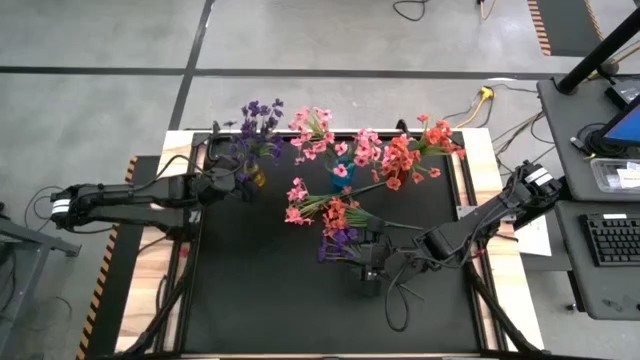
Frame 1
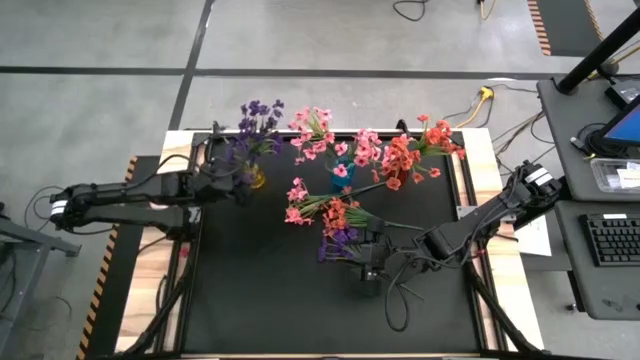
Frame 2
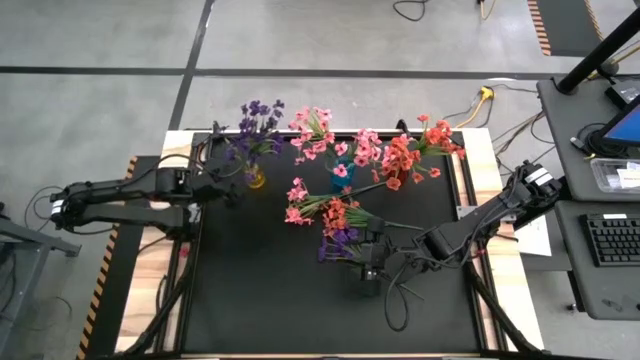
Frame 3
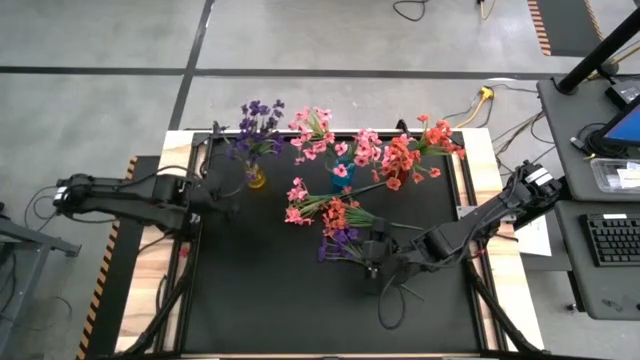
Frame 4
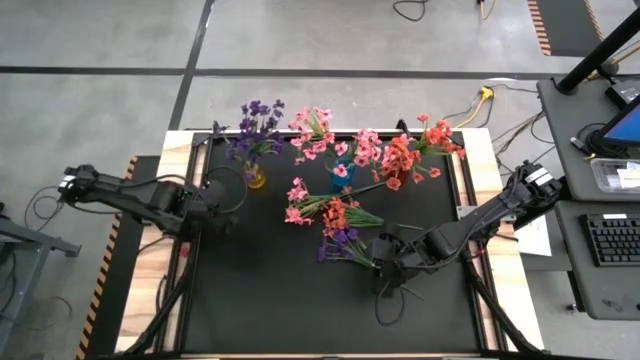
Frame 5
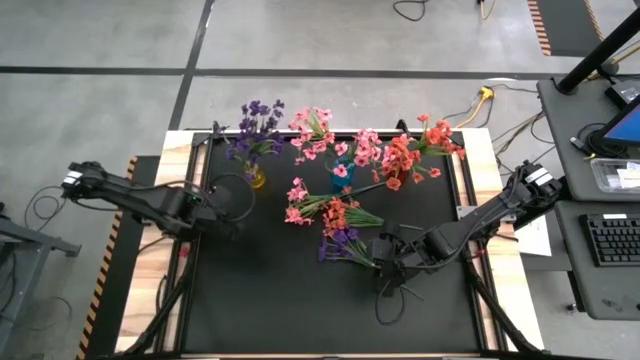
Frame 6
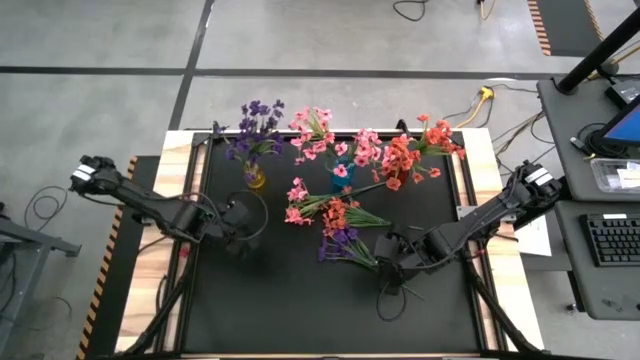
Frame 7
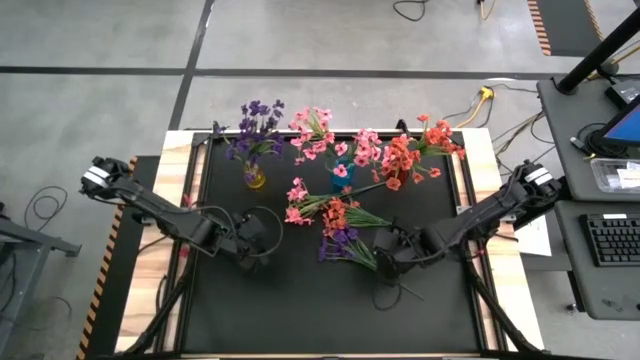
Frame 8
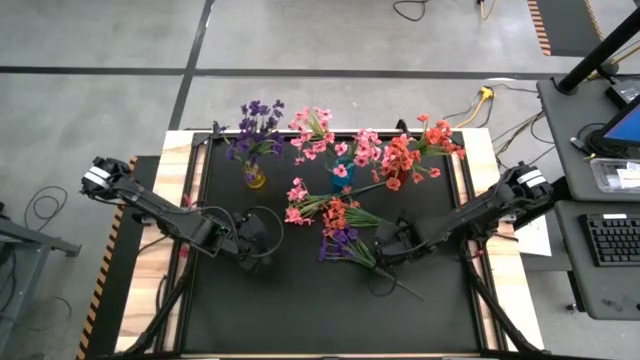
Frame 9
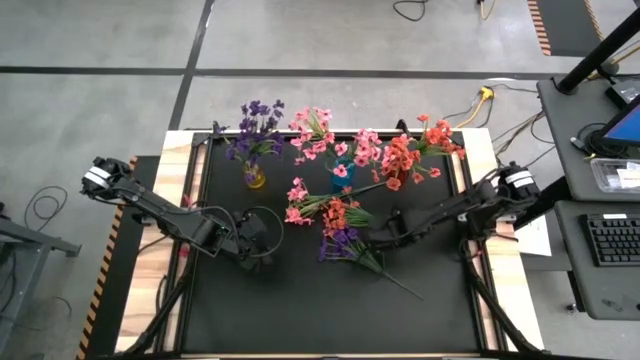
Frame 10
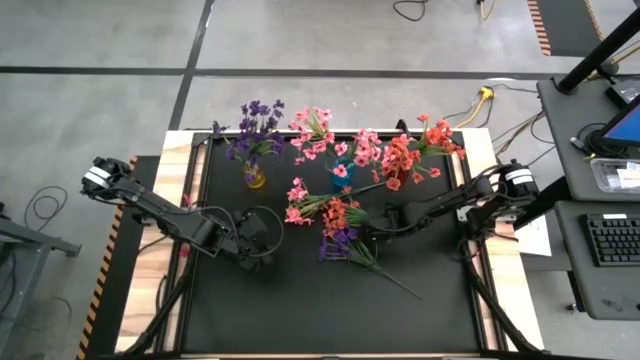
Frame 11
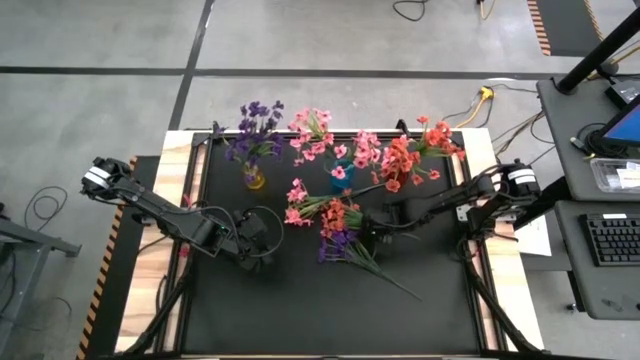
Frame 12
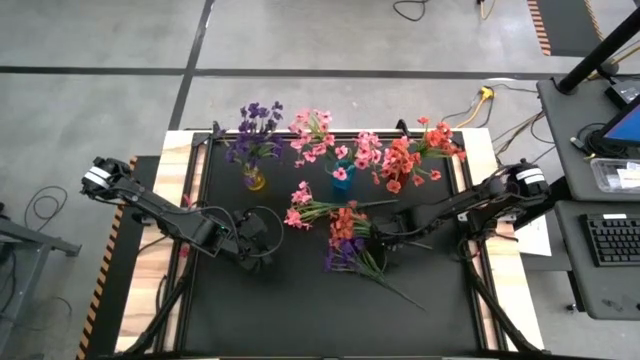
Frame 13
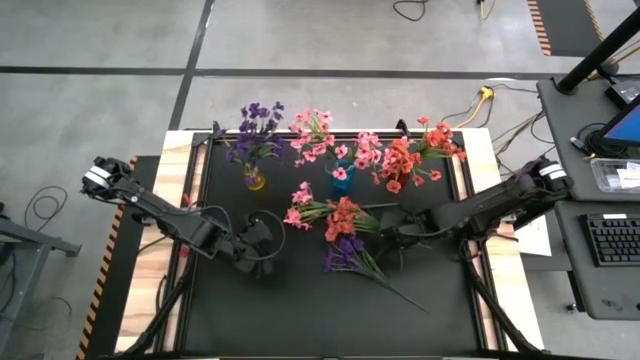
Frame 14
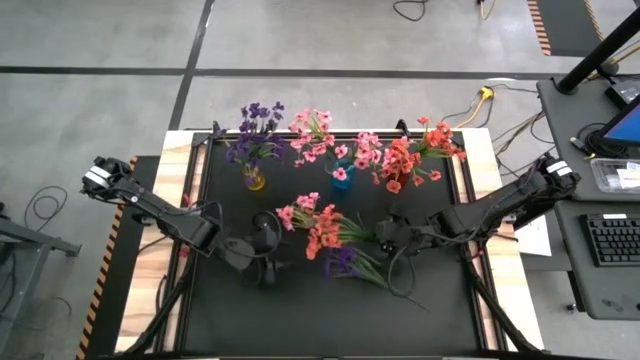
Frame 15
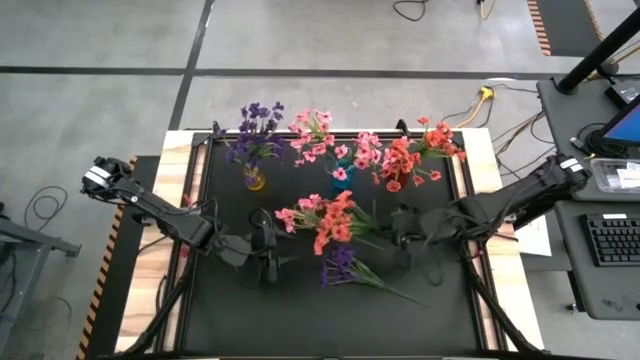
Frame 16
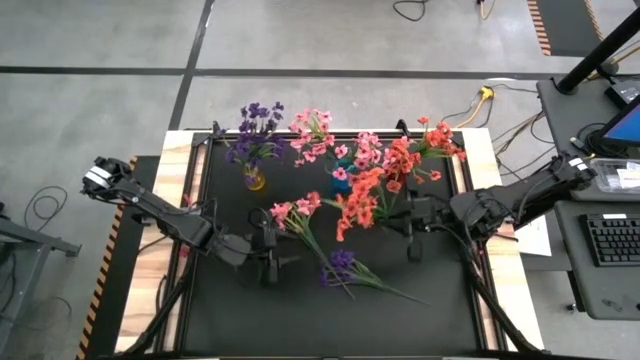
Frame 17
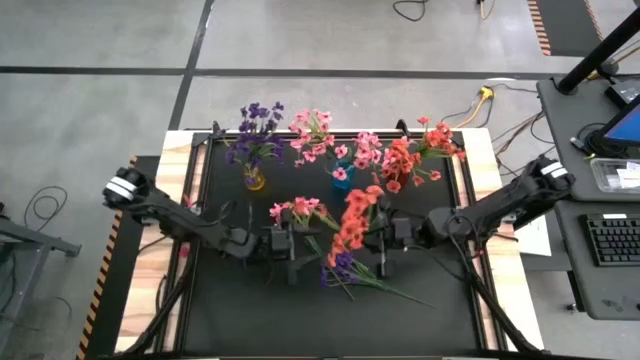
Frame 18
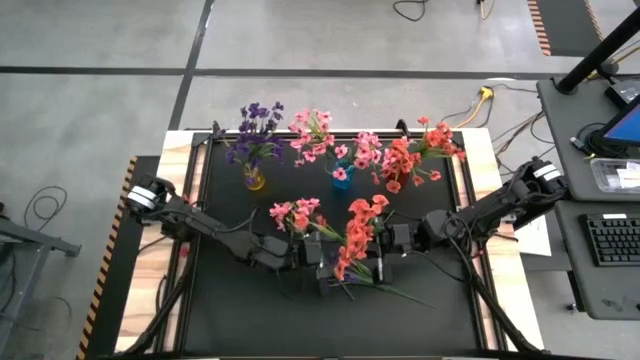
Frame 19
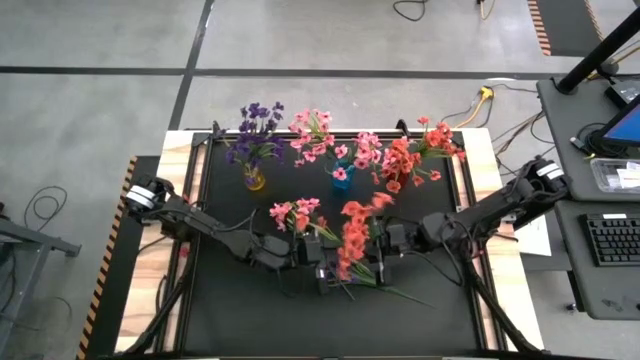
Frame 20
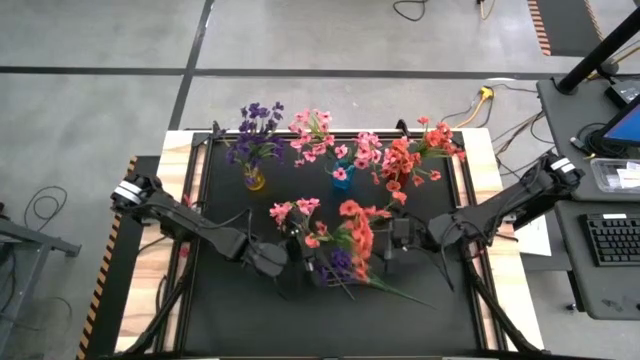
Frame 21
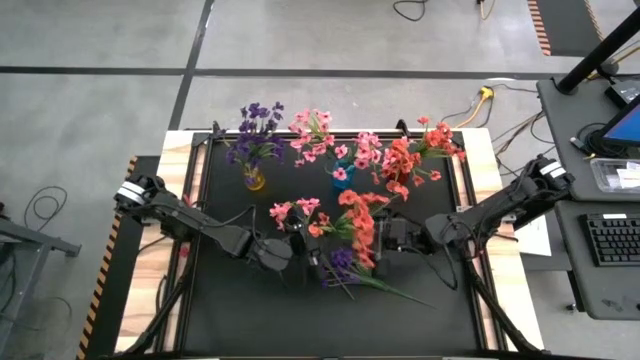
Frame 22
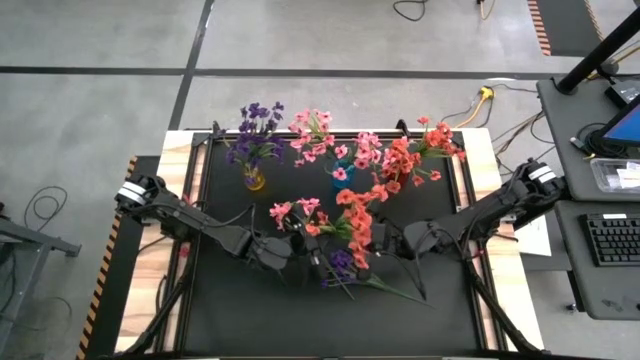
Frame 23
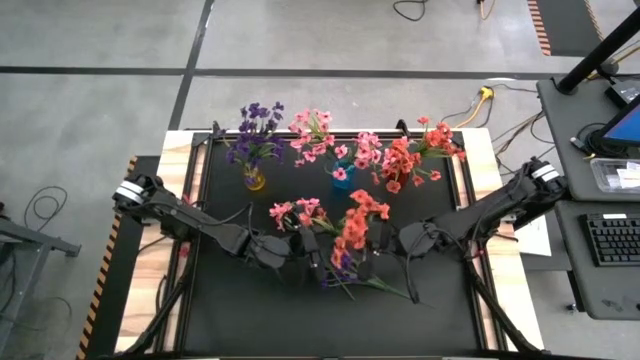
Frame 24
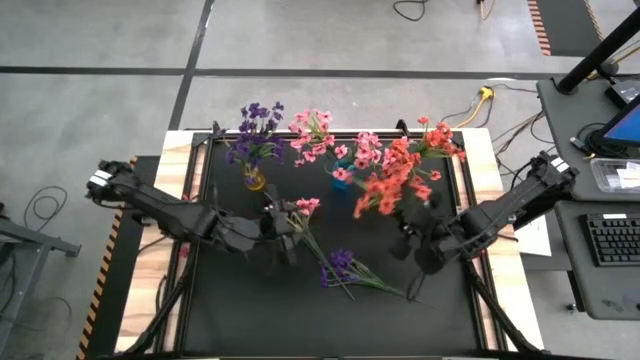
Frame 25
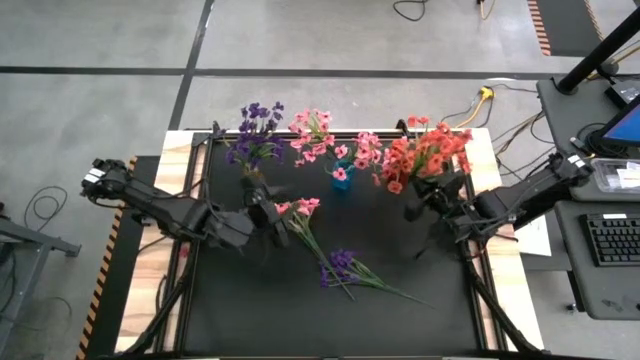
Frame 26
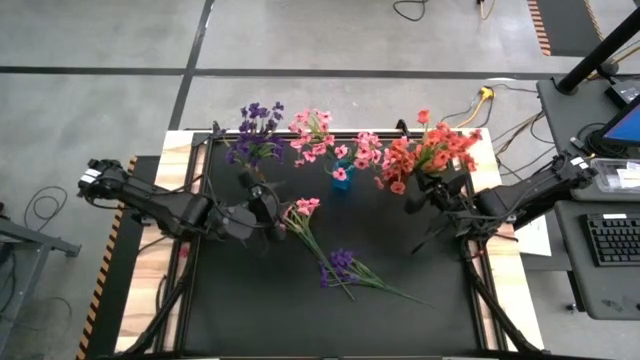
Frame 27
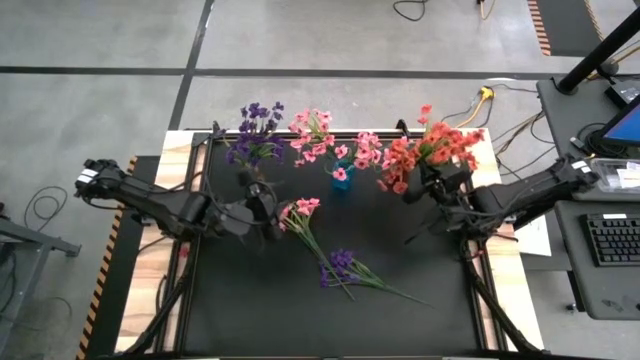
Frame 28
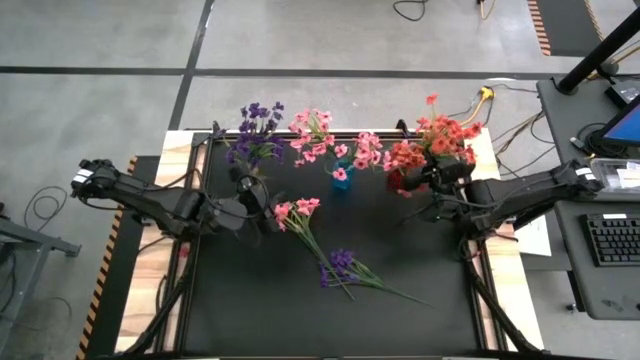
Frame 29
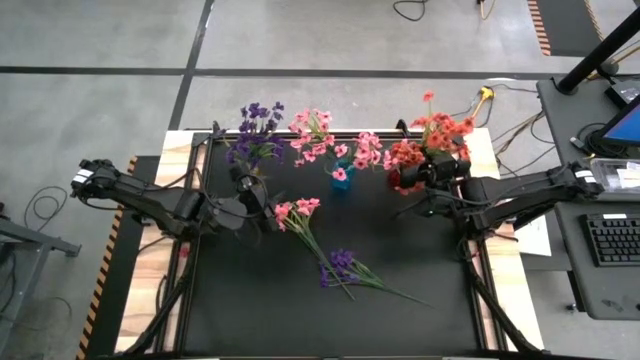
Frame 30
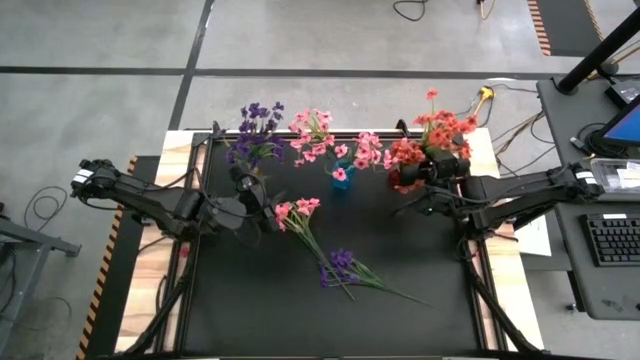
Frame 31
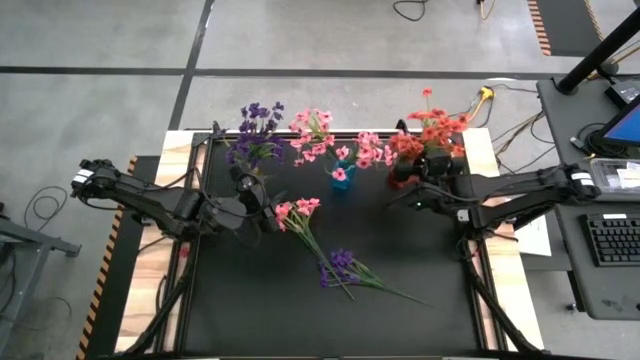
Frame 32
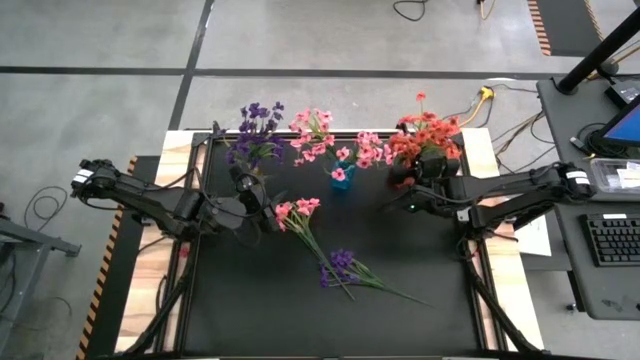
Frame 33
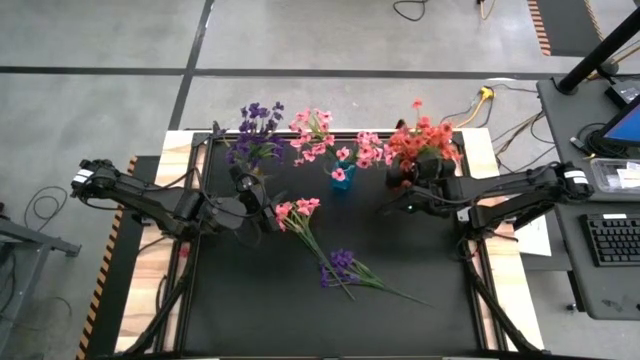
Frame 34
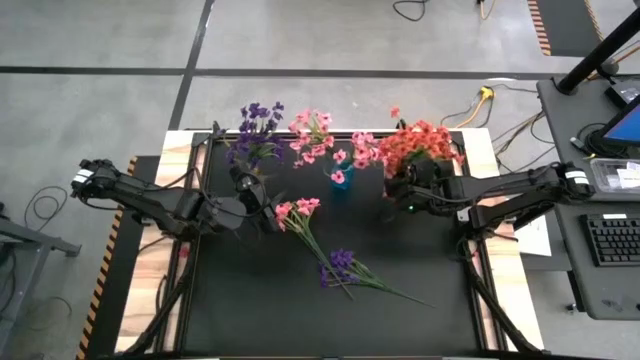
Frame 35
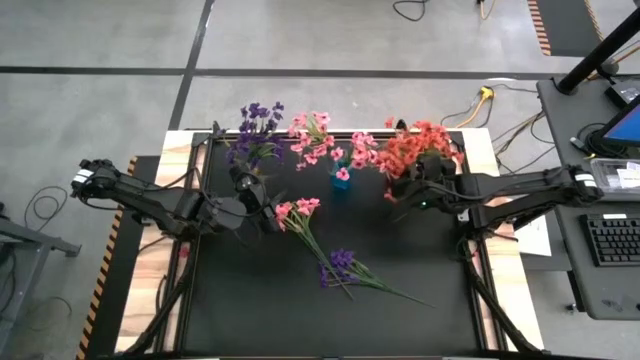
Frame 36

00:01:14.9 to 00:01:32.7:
Task: Sort flowers into vase by color
Put the orange flower into the red vase

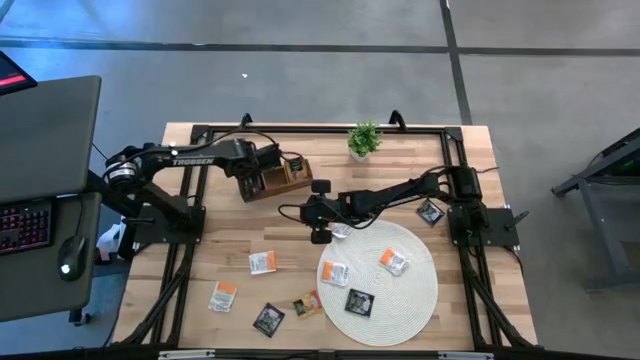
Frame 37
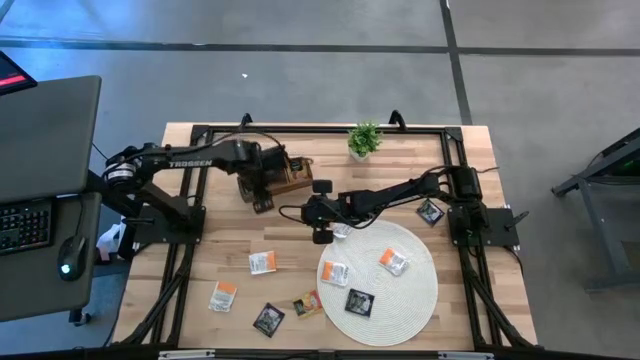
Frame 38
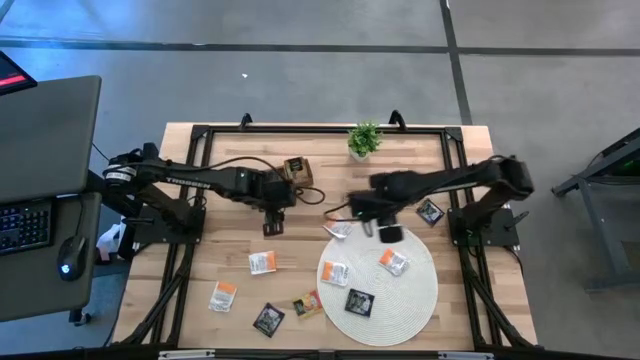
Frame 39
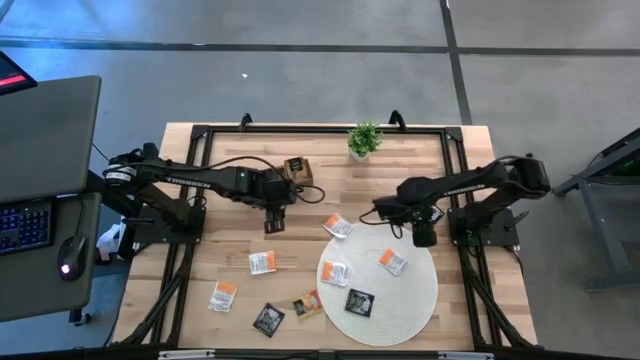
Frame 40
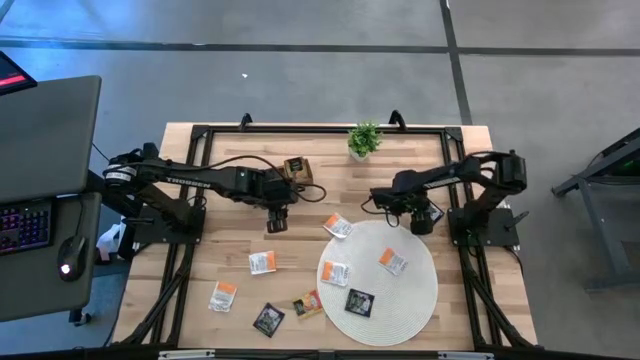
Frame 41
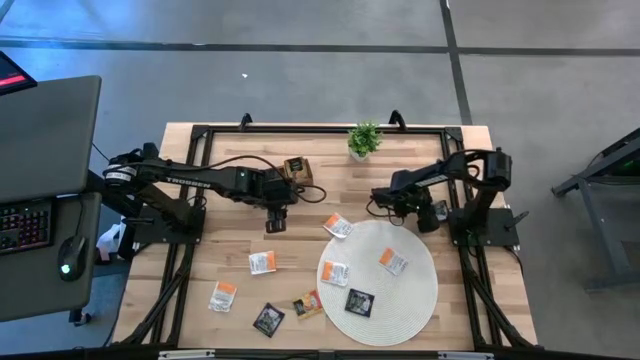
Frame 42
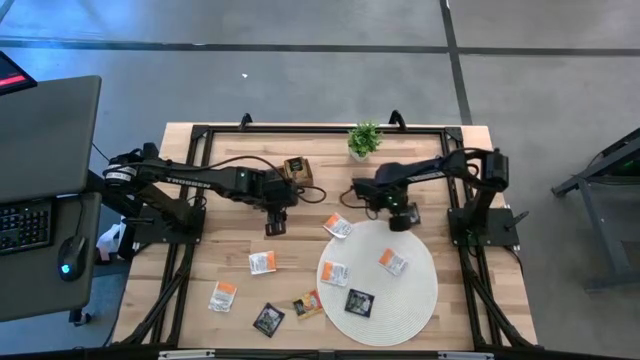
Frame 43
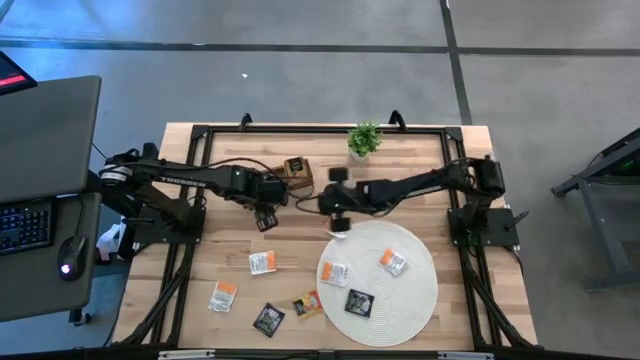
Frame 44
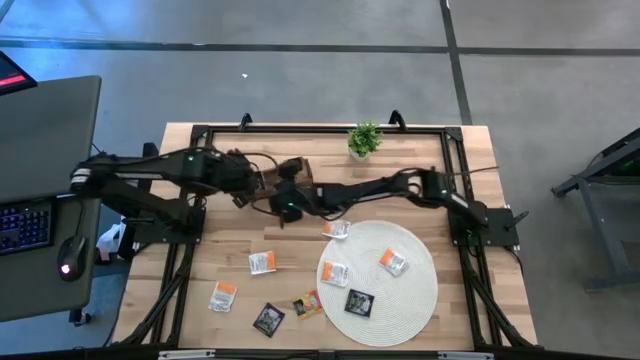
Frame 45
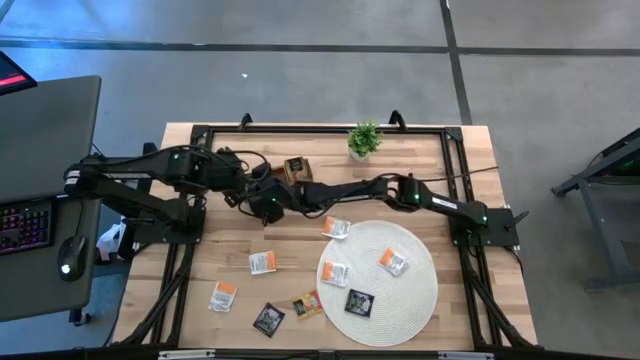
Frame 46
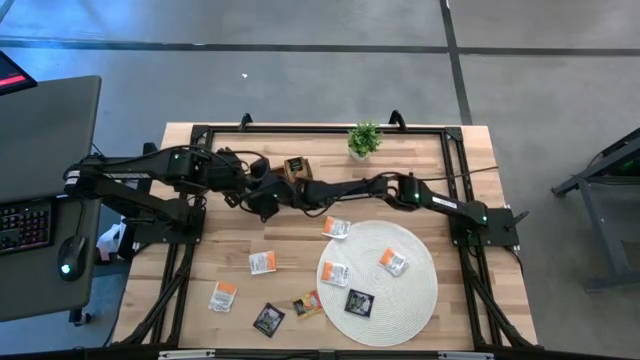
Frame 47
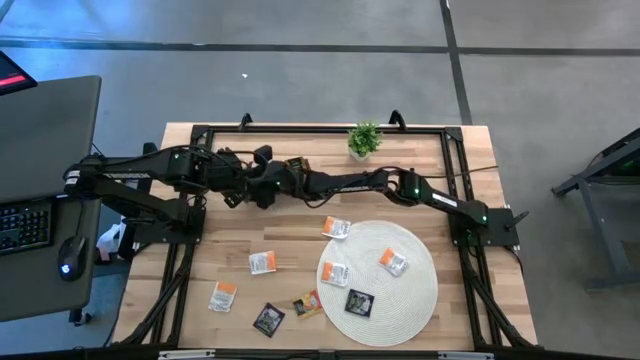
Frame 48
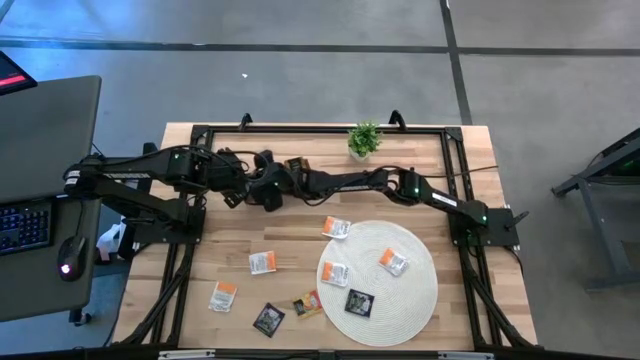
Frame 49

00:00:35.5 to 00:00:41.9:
Task: Pick & Place Tea
Put the violet tea bag into the left section of the wooden organizer
